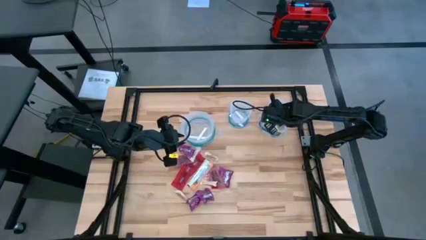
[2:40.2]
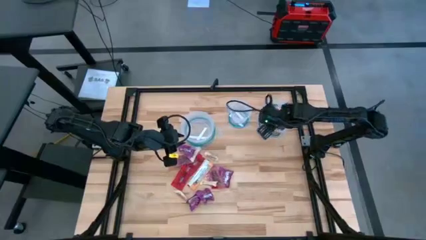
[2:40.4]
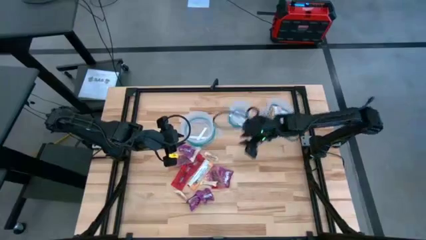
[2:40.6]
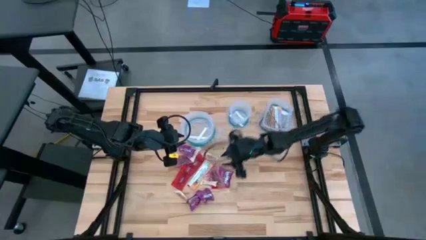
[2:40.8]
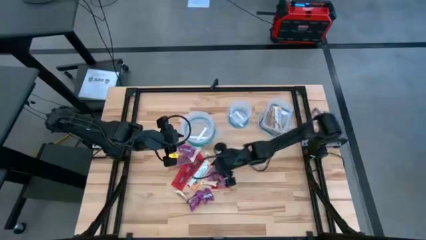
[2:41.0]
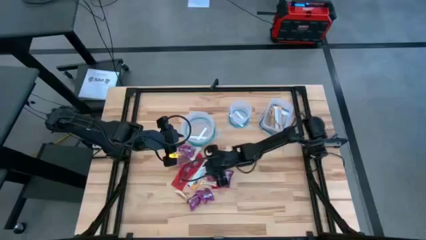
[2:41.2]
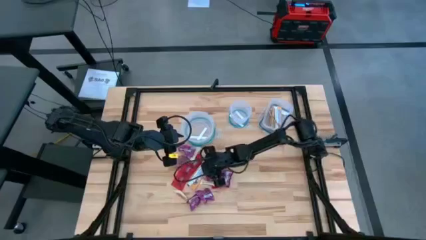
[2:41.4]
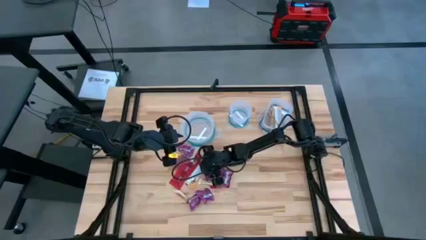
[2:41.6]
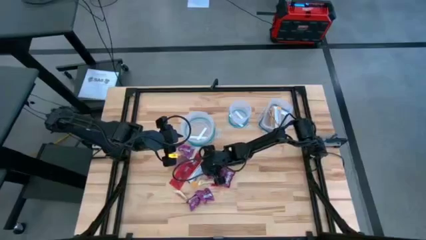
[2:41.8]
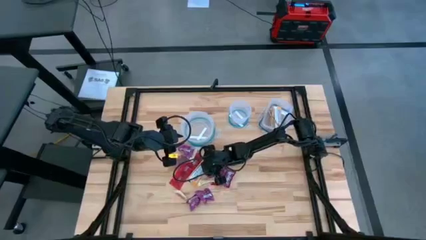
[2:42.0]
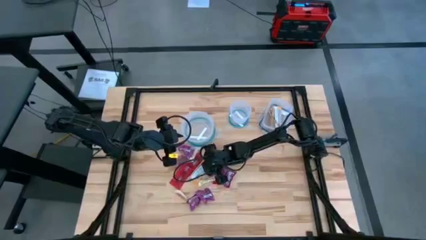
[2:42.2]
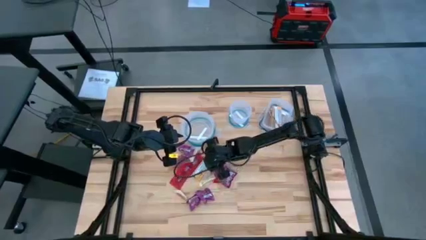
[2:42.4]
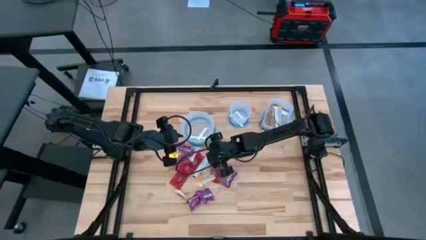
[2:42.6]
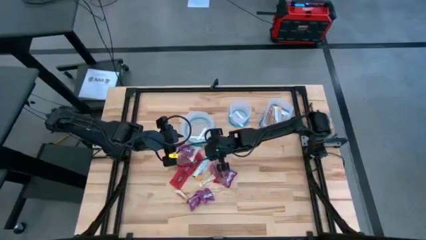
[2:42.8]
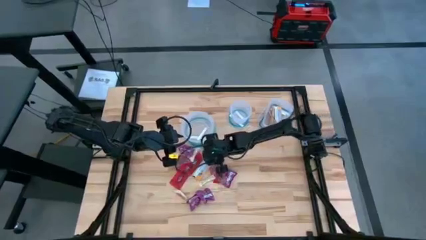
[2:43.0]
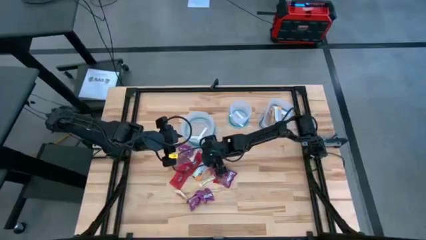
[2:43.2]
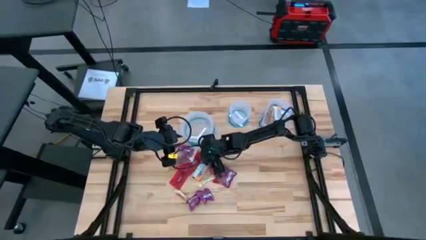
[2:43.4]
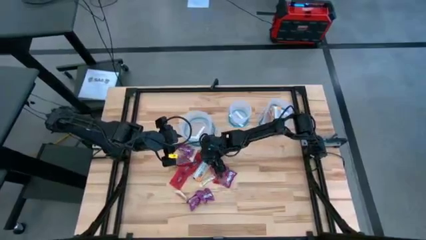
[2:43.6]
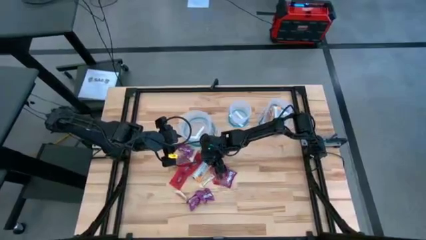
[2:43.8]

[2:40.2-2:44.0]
Task: Sort candy
Put the yellow candy into the rectangular transparent bin

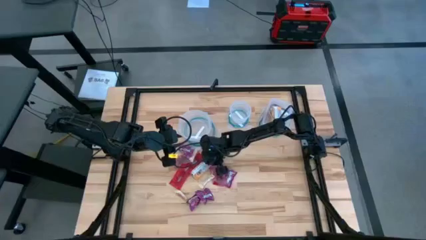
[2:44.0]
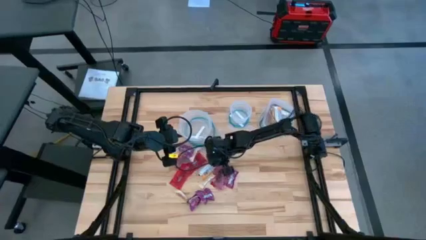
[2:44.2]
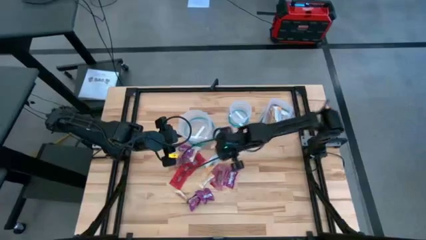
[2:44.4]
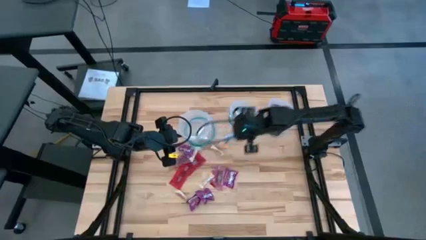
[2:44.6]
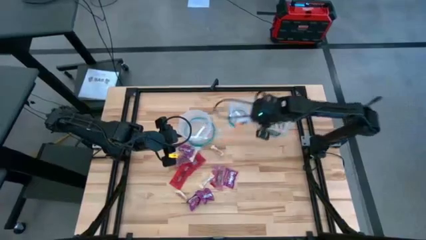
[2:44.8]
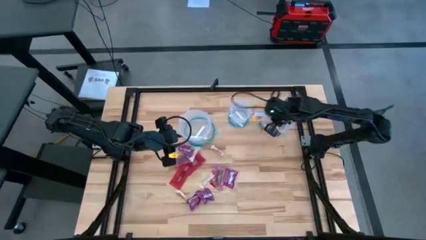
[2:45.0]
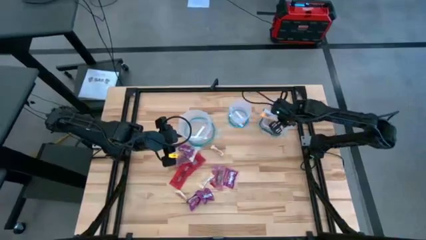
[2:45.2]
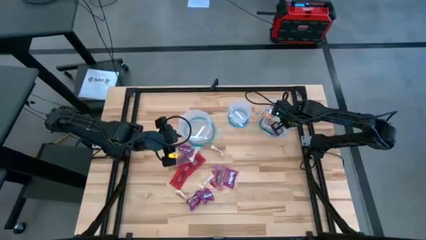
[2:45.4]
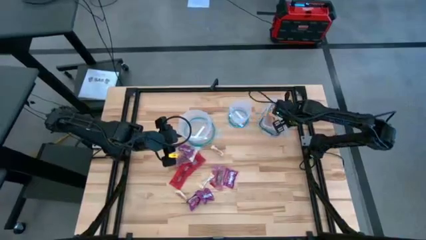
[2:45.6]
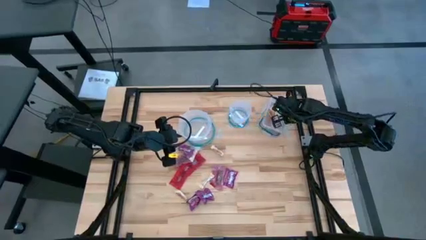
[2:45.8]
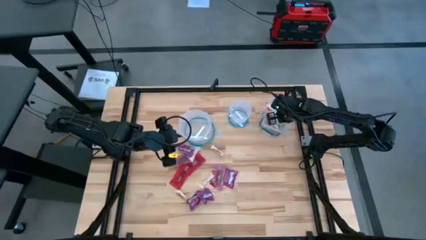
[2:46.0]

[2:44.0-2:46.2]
Put the yellow candy into the rectangular transparent bin

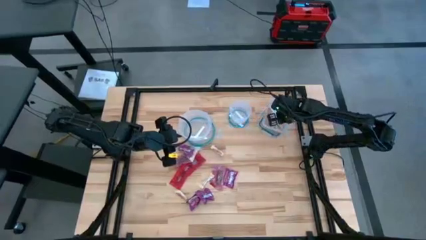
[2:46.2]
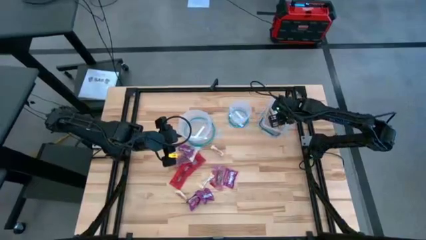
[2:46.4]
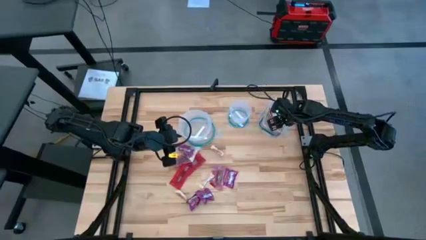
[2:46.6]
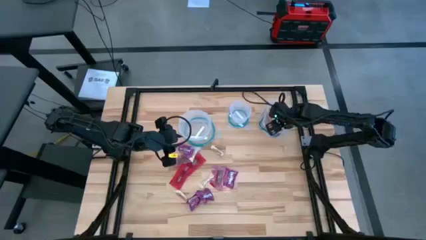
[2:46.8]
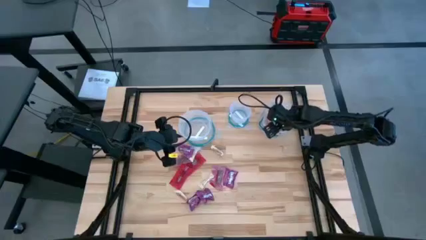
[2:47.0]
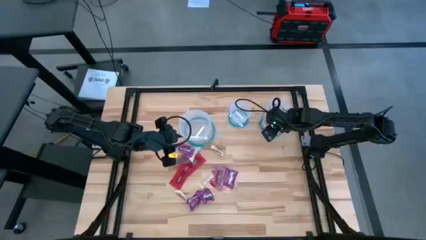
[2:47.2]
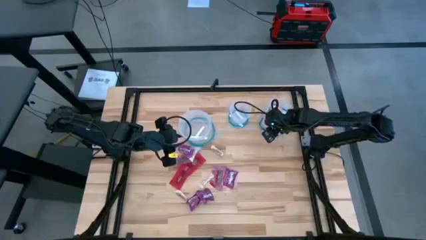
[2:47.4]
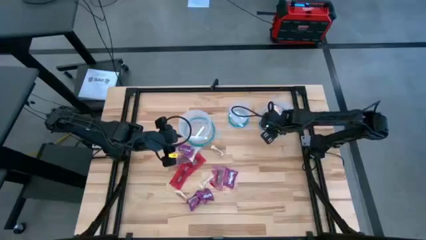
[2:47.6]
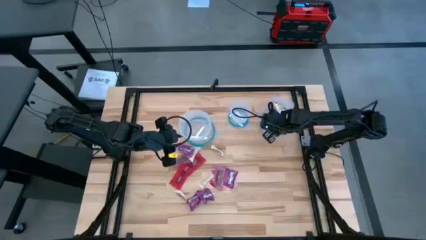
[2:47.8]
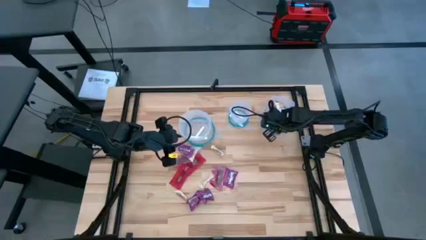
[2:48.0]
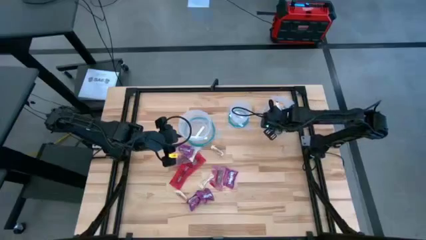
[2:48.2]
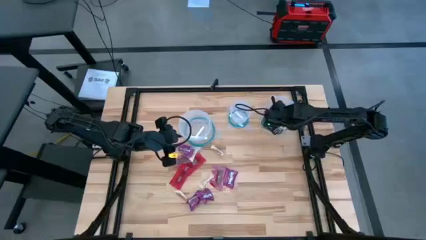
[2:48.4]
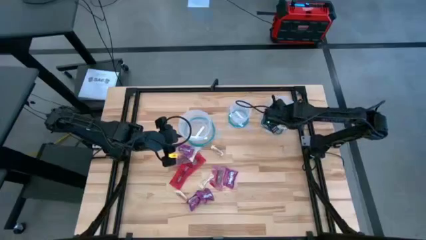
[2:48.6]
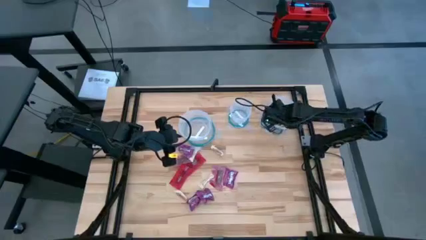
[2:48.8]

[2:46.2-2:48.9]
Adjust the yellow candy

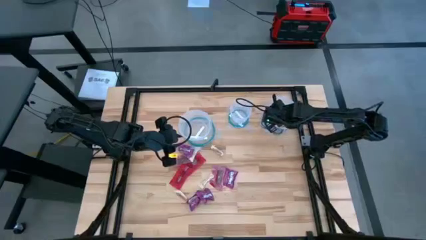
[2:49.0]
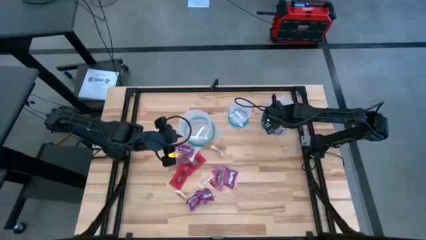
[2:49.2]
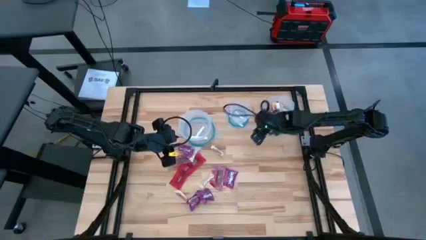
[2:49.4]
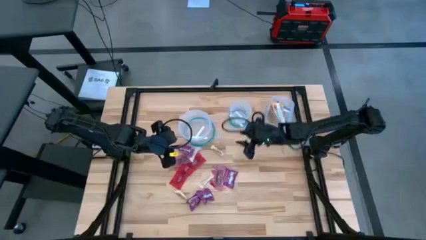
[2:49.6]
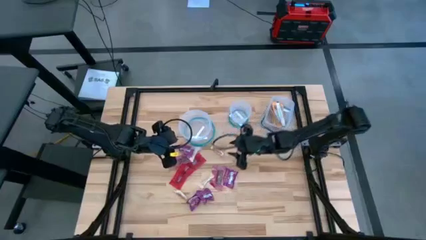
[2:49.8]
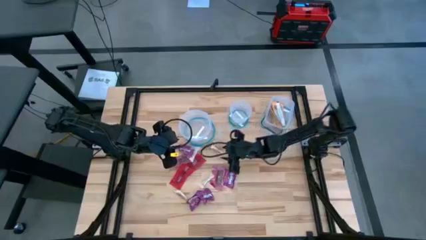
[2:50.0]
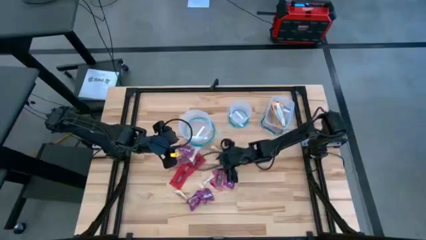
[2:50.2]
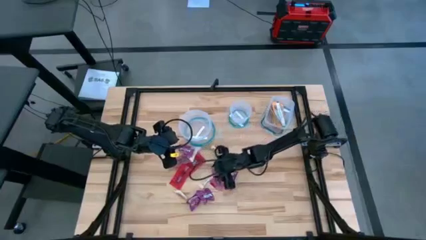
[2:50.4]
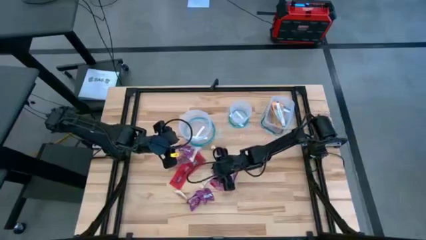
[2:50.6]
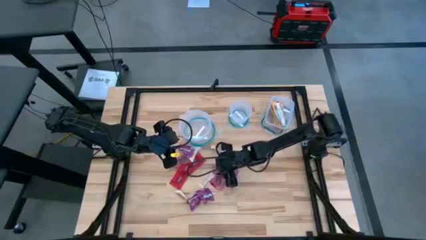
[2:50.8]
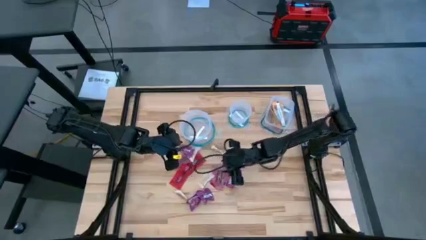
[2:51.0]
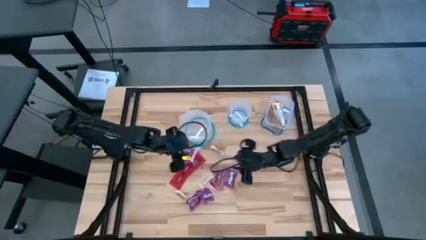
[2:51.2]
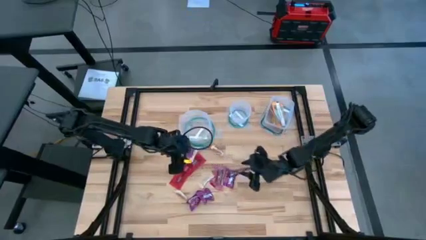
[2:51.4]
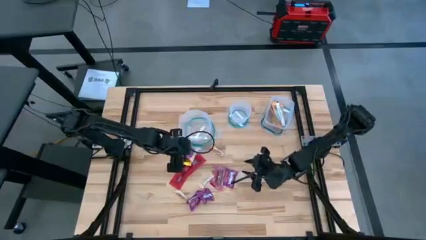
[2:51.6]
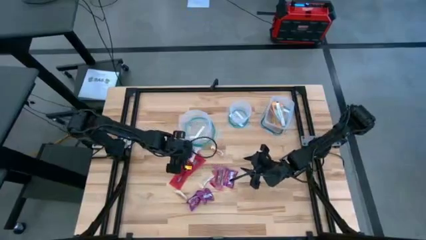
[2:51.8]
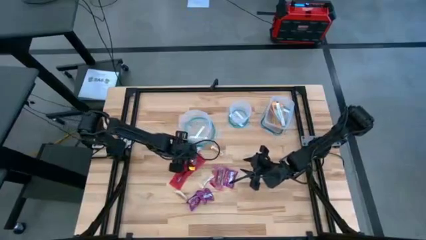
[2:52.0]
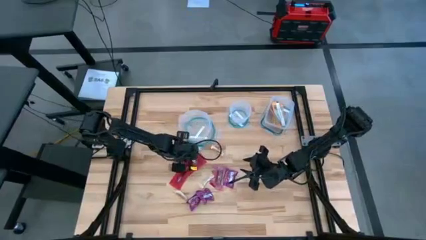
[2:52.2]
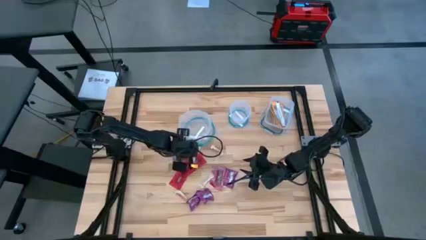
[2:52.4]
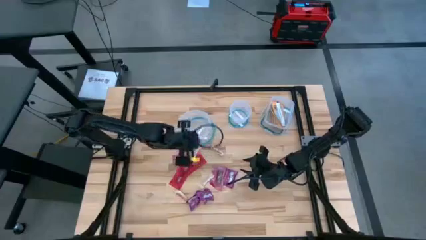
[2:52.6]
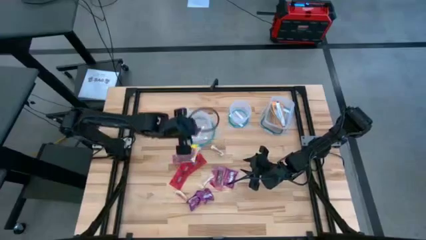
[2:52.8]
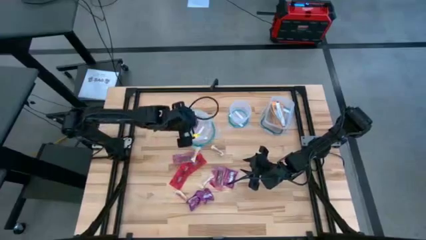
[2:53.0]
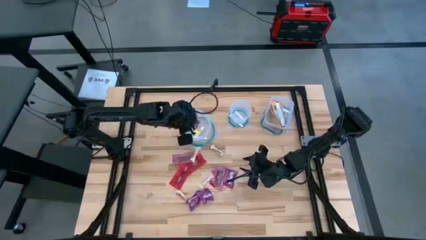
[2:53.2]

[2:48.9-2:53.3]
Put the violet candy into the big round transparent bin

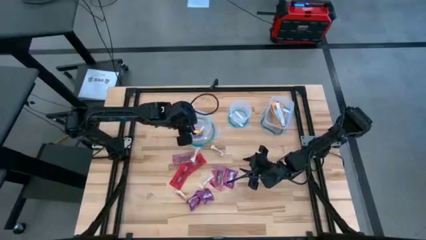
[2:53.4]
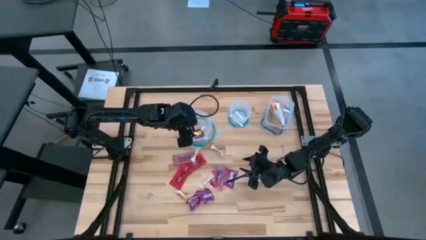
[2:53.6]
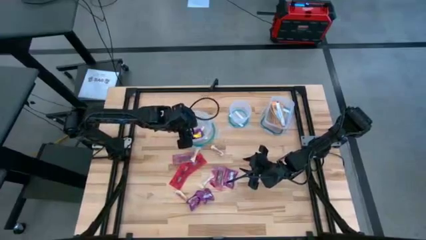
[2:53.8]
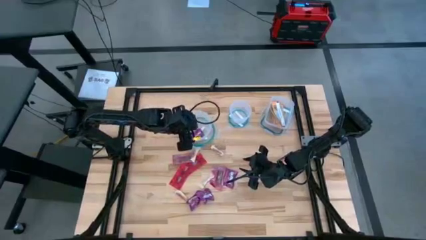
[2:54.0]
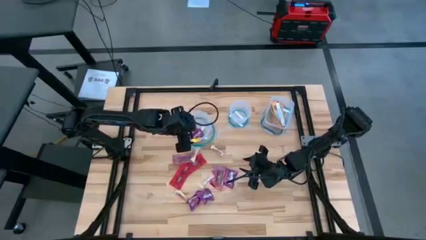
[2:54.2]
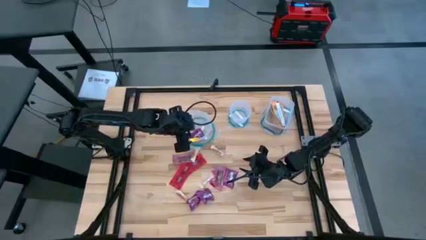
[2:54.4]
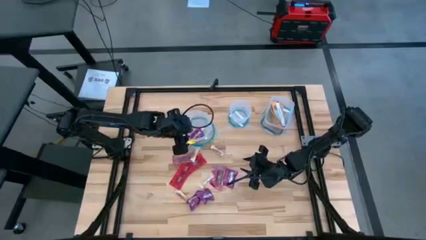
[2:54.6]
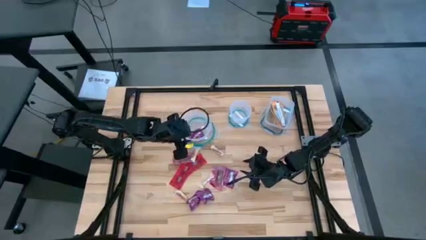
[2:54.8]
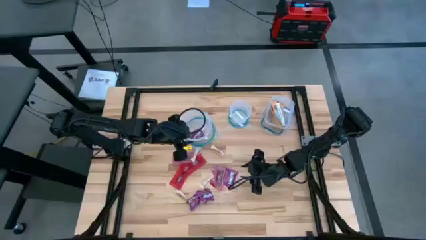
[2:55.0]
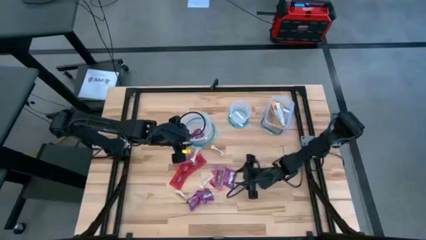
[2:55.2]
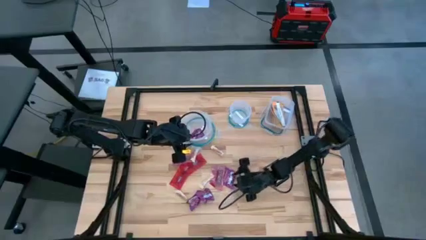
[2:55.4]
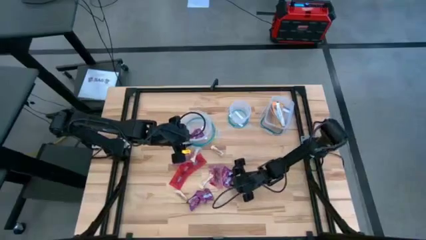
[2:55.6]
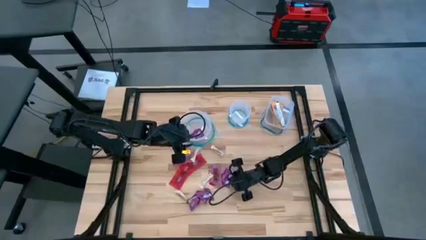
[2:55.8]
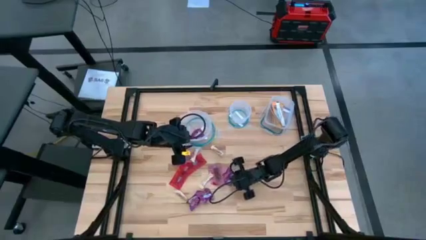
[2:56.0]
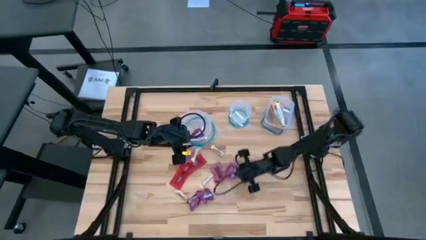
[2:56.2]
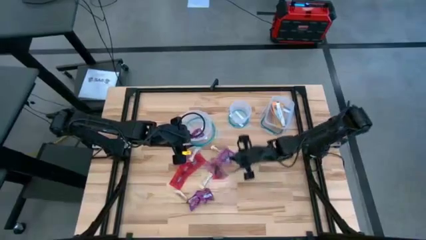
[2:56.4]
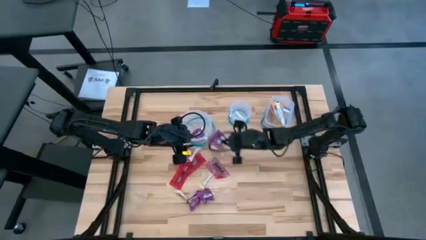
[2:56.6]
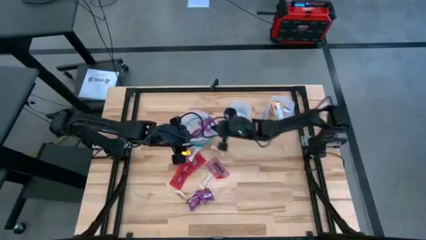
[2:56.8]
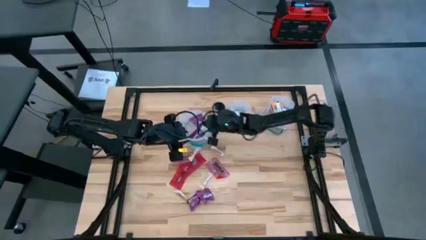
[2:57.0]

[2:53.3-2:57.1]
Put the violet candy into the big round transparent bin
